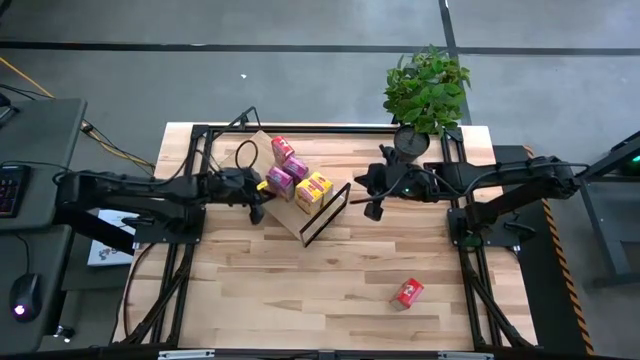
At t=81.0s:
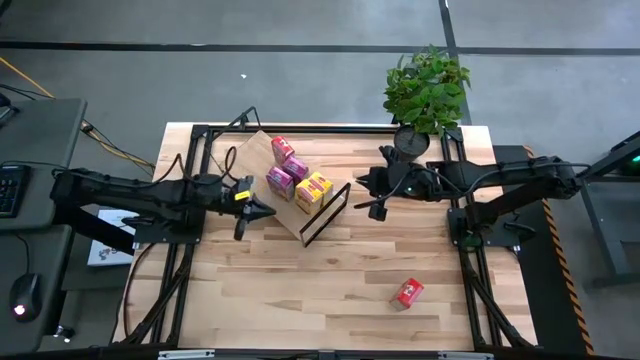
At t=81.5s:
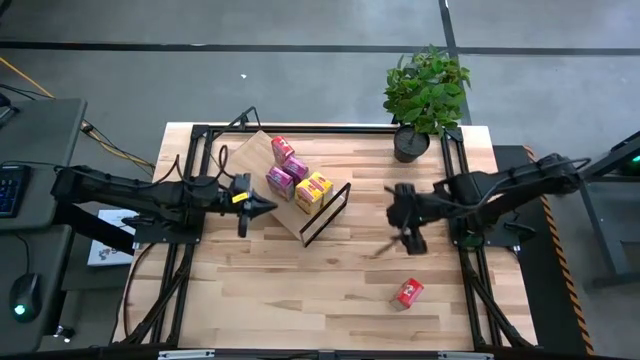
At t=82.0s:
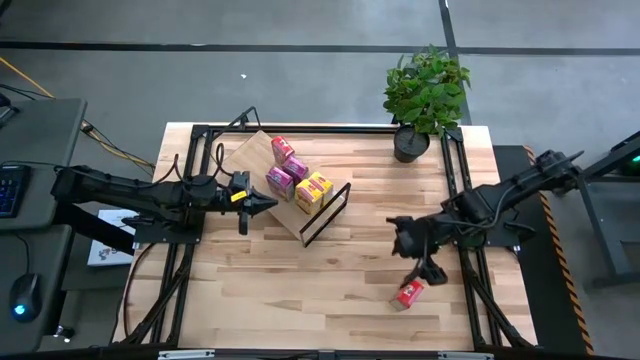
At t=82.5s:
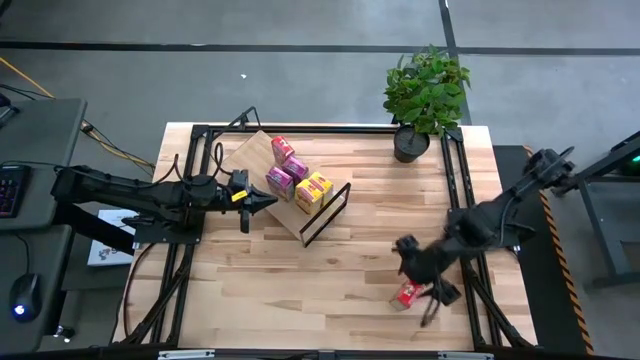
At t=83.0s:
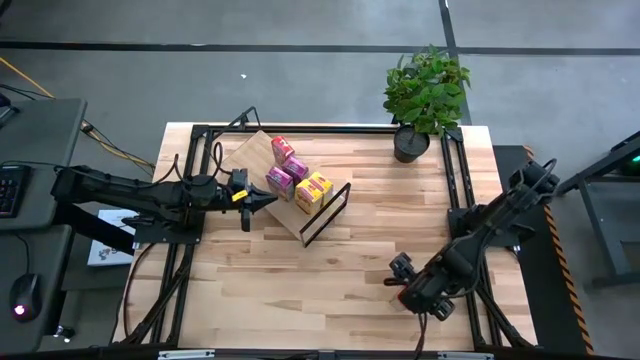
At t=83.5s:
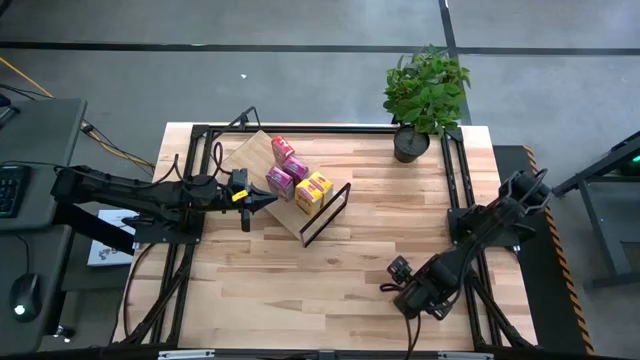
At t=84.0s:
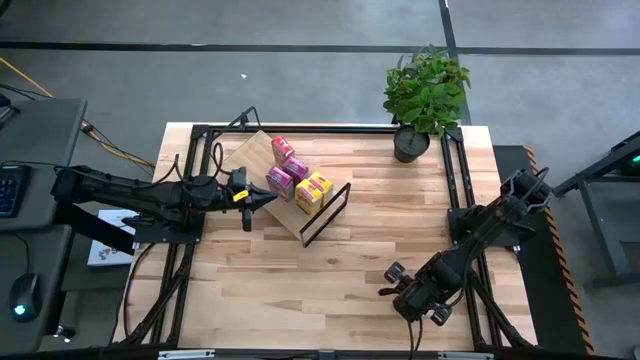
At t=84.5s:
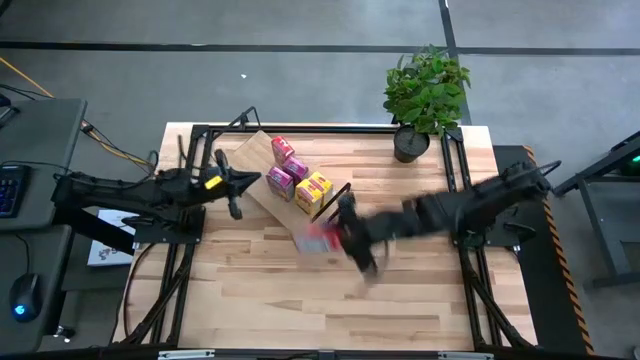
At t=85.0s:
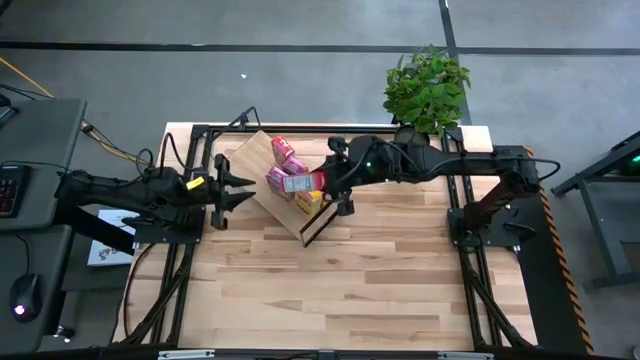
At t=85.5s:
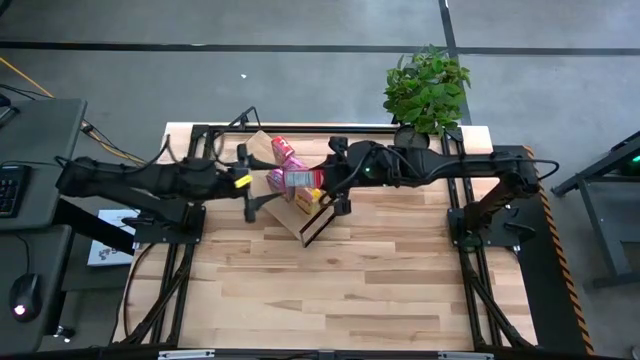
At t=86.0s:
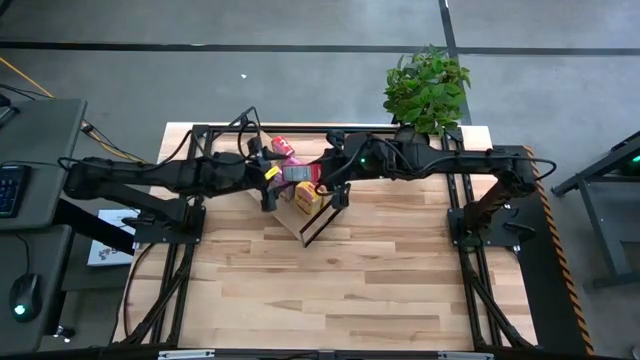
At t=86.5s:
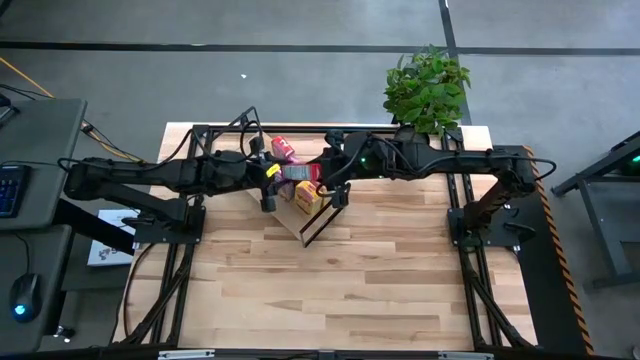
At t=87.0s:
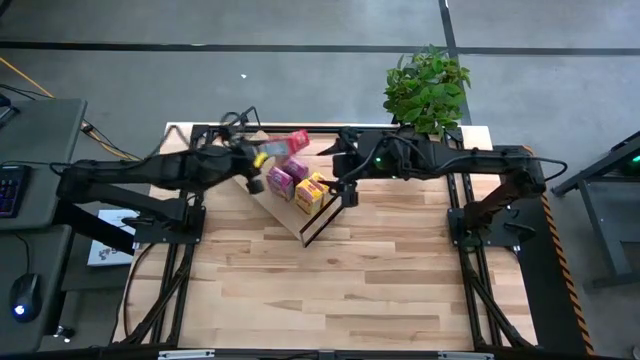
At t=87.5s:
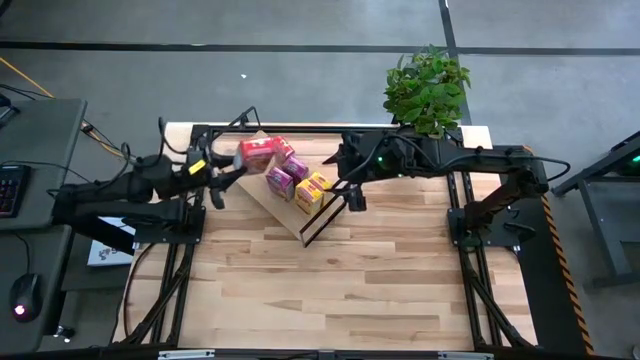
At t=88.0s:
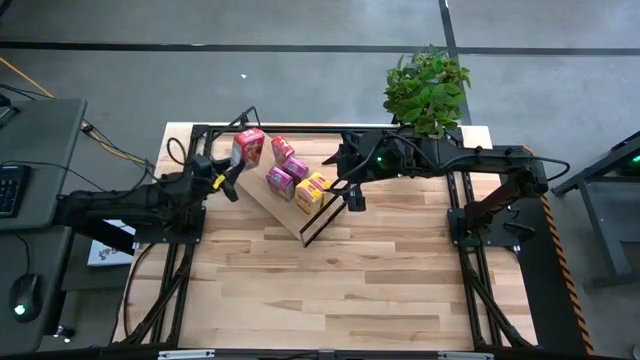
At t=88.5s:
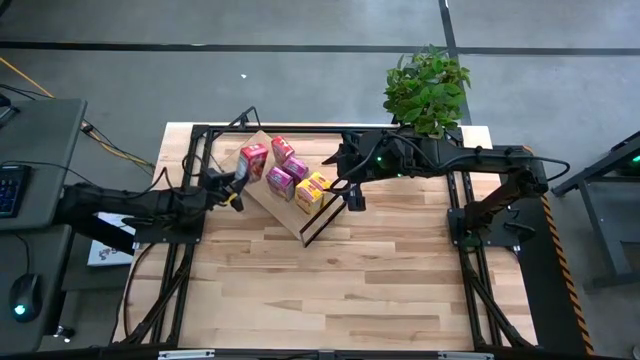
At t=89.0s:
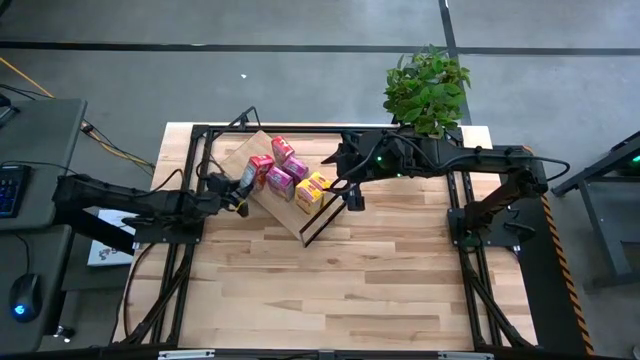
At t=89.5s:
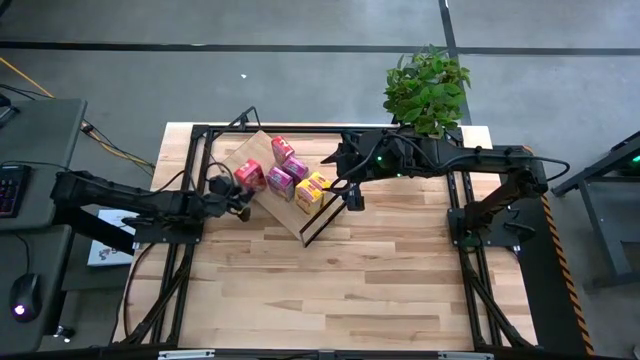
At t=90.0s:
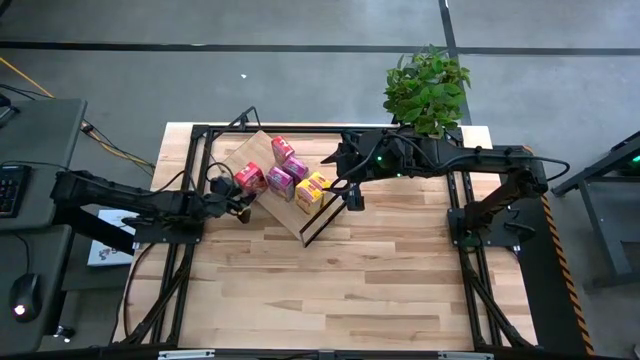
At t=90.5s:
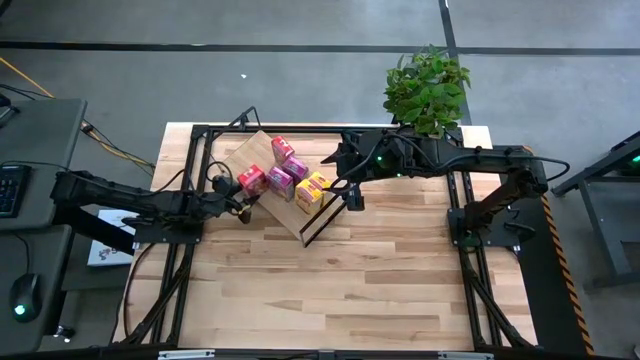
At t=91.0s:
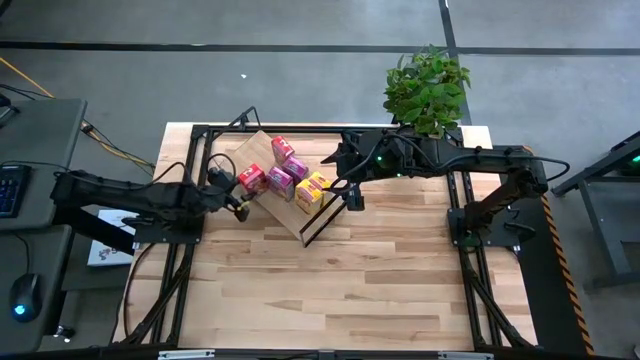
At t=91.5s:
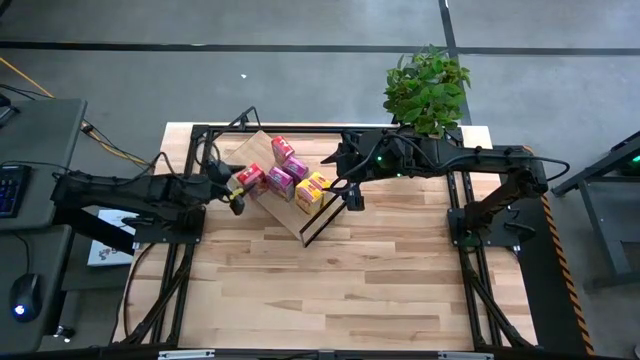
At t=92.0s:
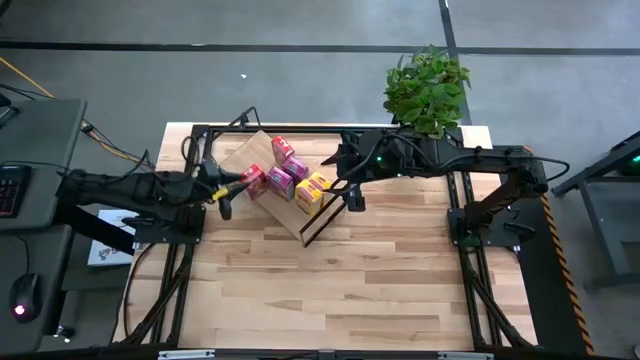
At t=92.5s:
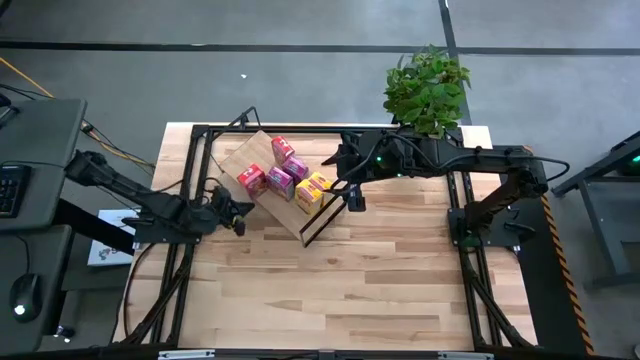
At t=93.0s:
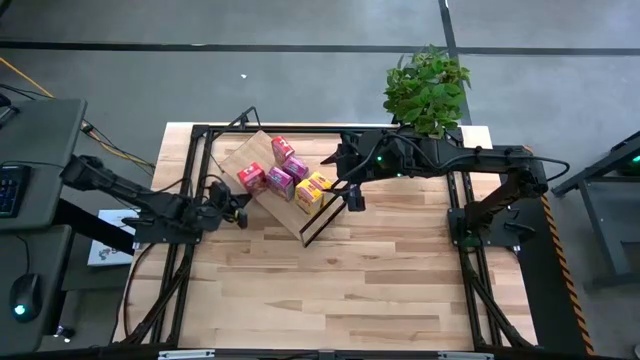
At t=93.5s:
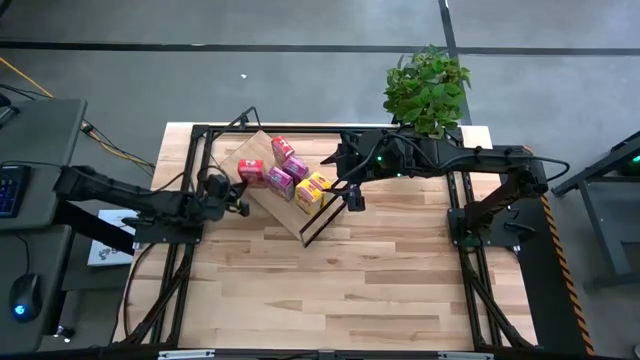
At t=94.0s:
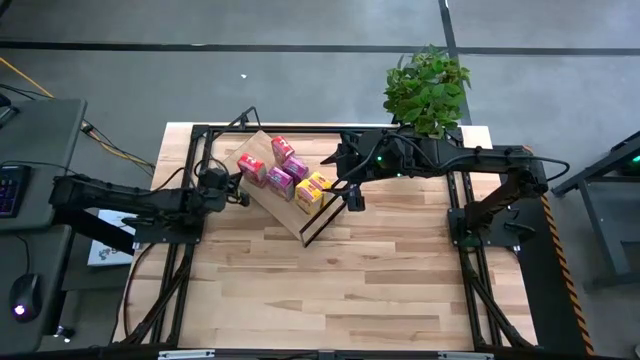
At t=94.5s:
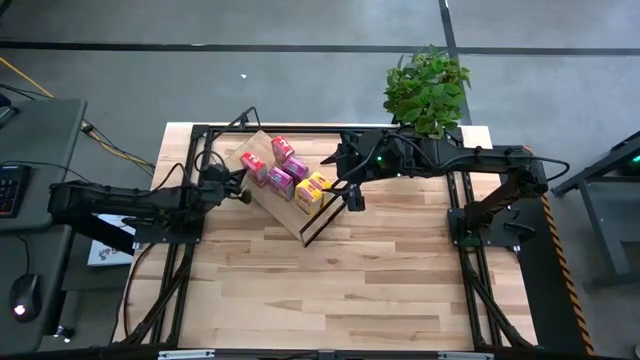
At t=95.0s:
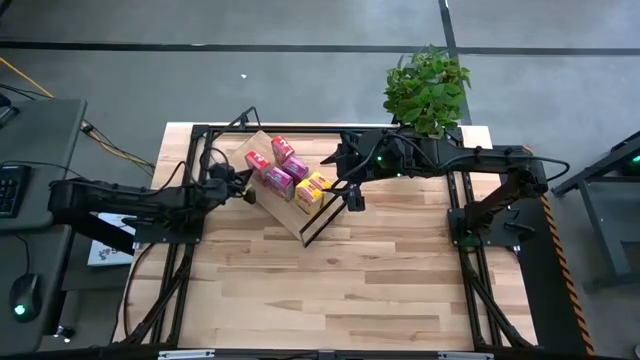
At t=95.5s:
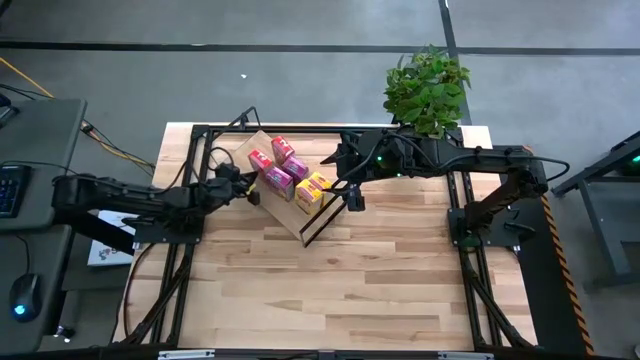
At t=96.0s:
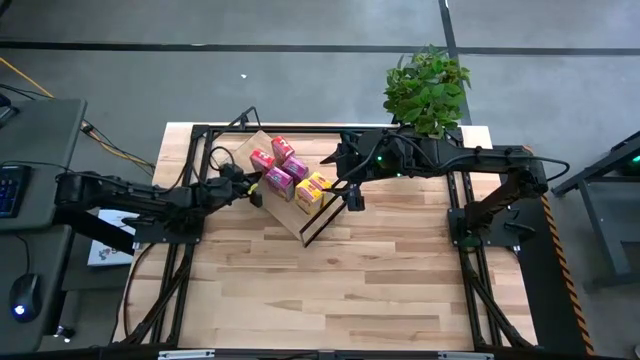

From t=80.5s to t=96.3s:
Task: Stack cereal on shelf
Put the red cereal box on the shelf aligned with the other red cereal box

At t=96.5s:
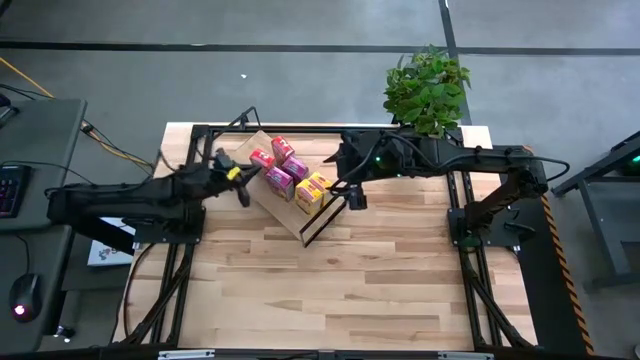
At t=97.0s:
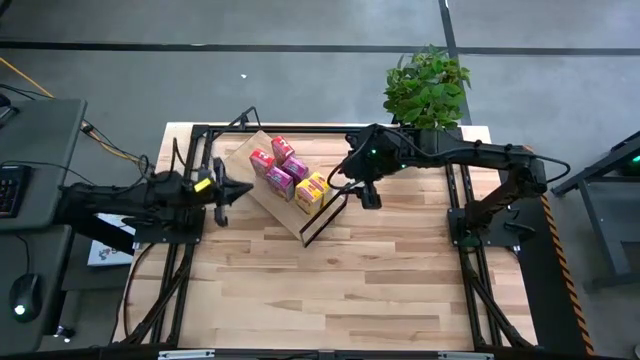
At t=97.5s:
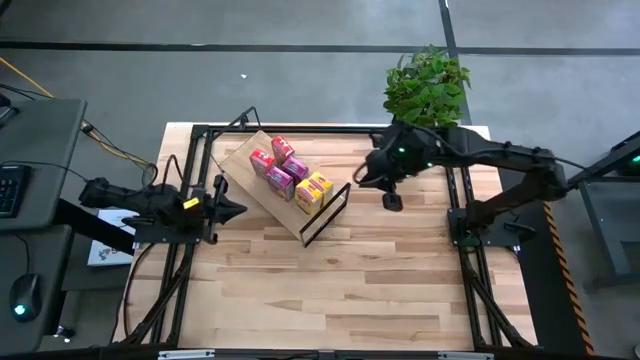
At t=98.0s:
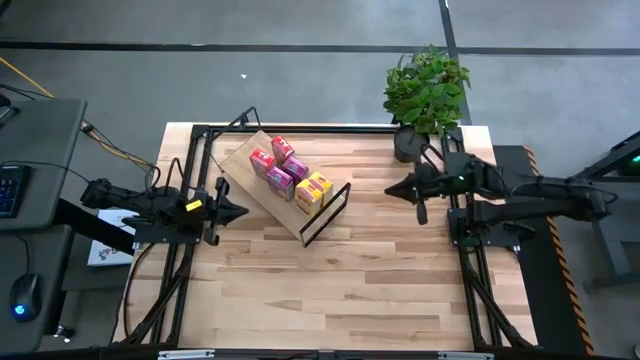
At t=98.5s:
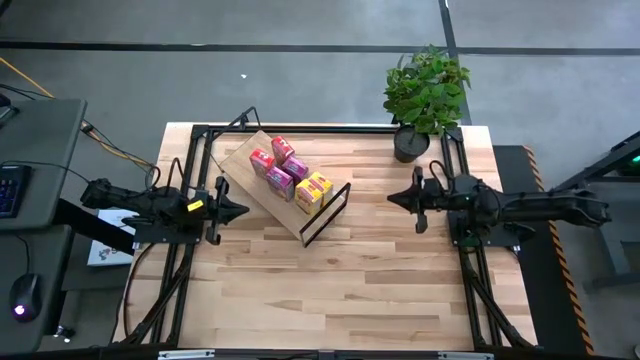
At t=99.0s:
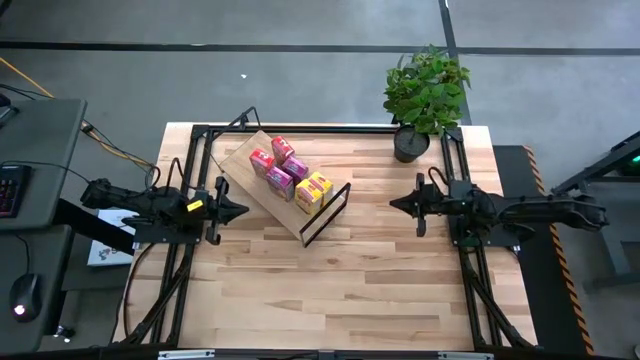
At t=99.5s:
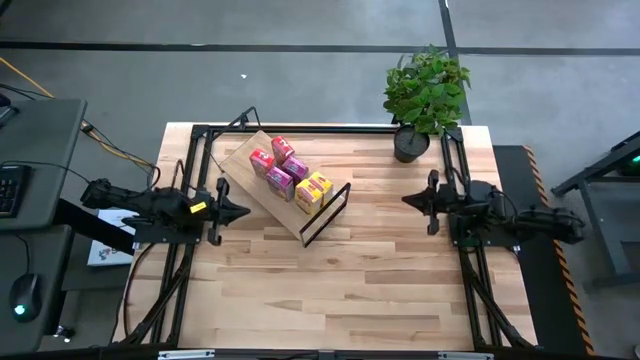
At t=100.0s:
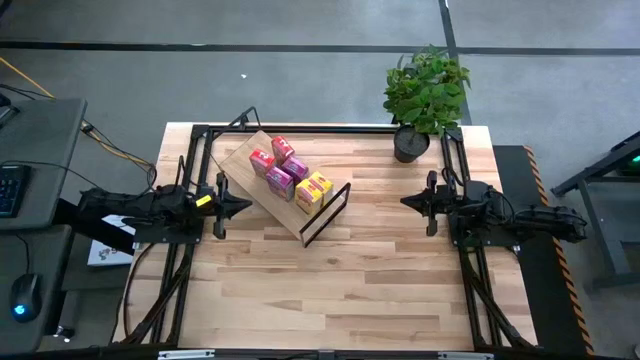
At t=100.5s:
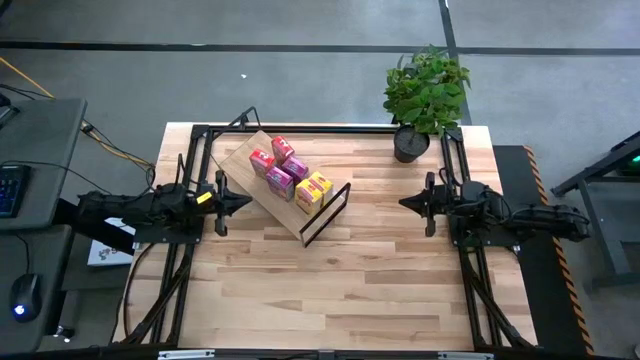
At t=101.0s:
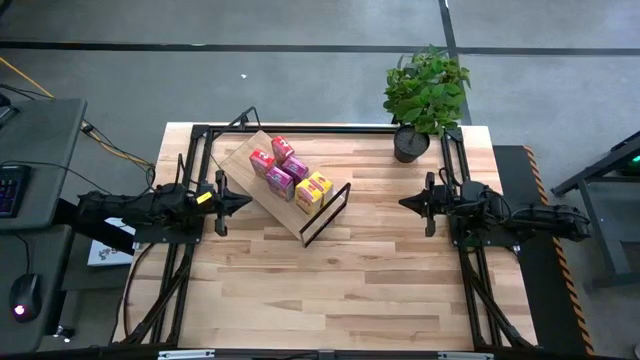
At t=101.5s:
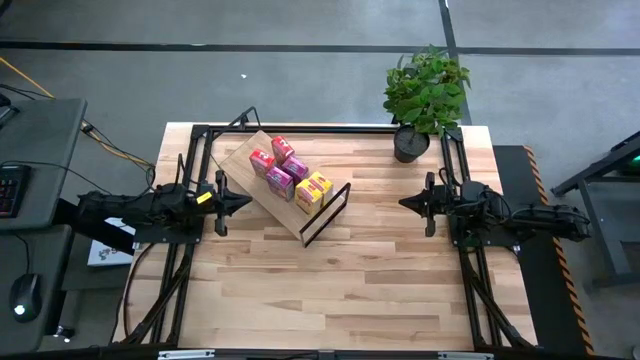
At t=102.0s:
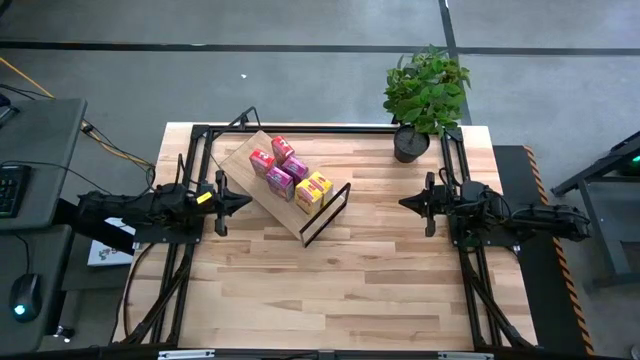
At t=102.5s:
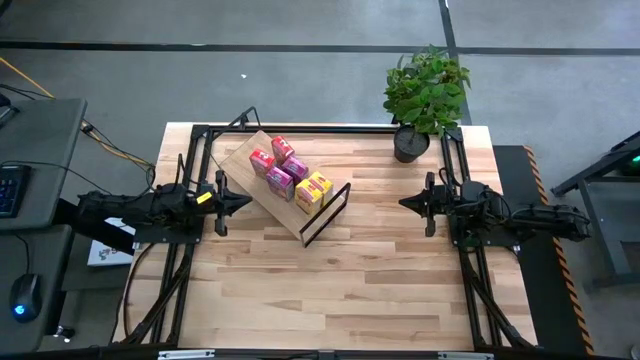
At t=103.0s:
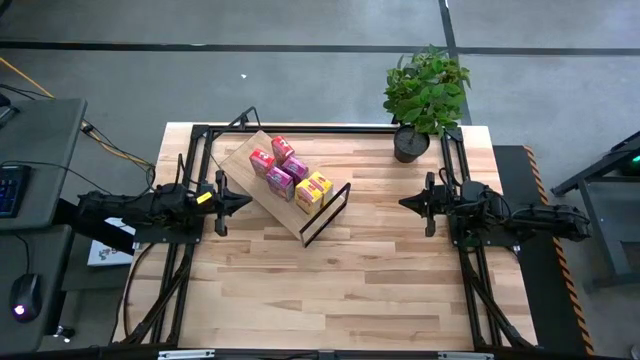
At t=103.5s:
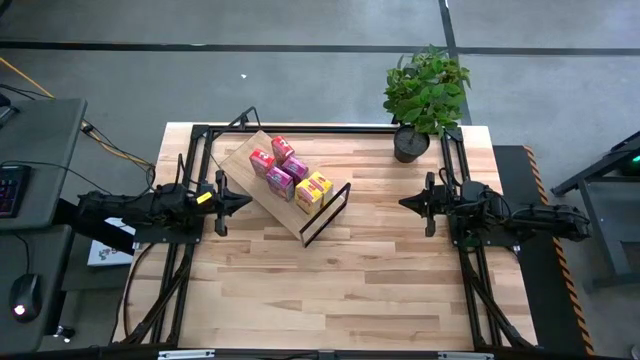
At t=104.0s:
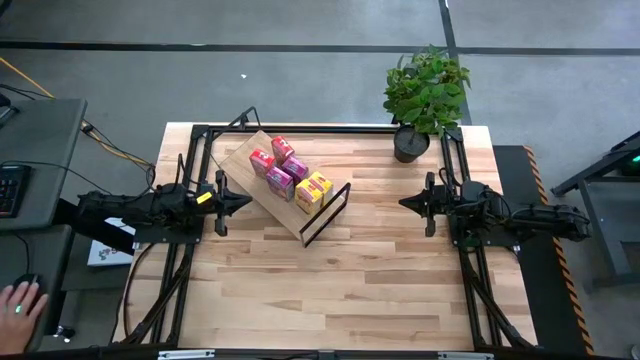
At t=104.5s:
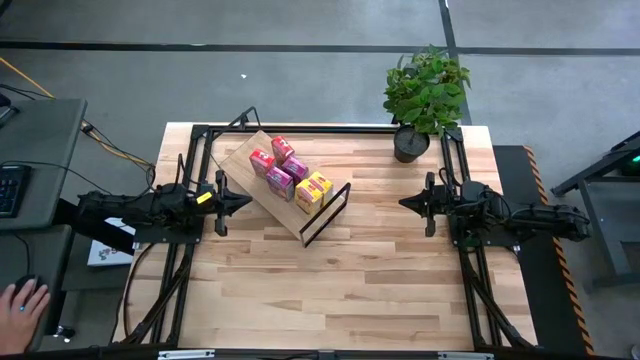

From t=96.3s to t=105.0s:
Return to Home Position
